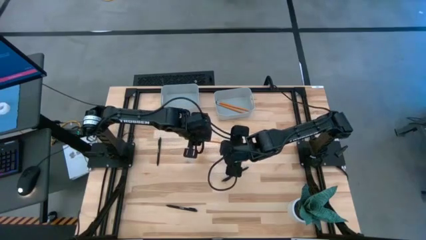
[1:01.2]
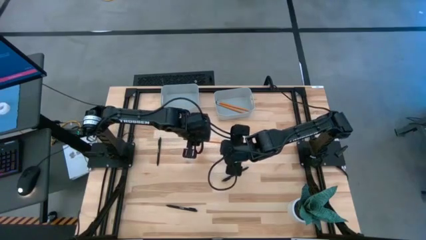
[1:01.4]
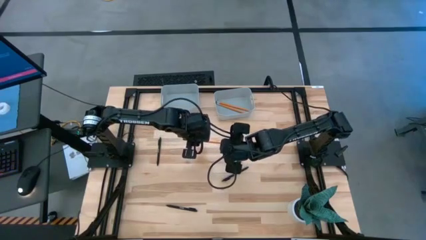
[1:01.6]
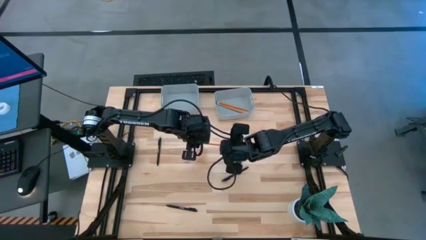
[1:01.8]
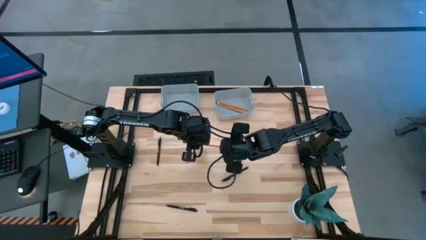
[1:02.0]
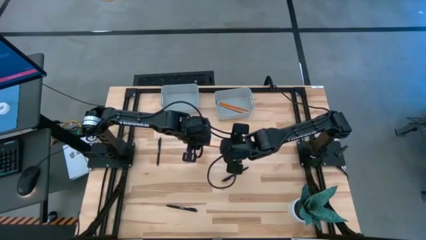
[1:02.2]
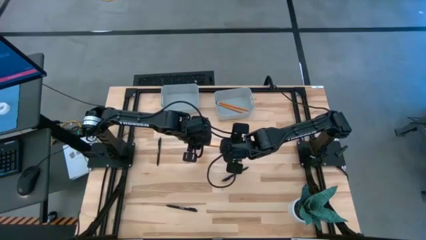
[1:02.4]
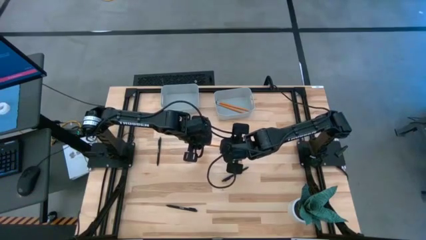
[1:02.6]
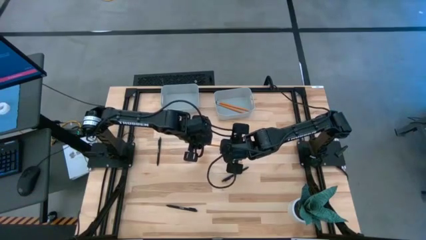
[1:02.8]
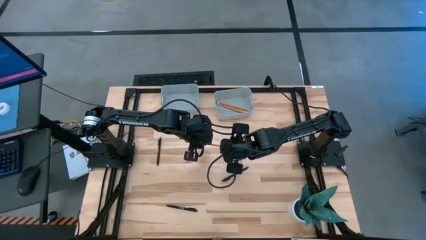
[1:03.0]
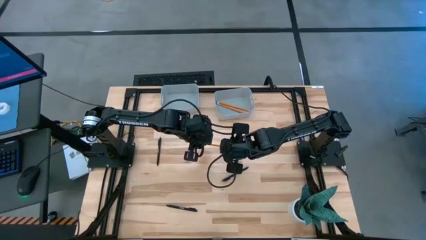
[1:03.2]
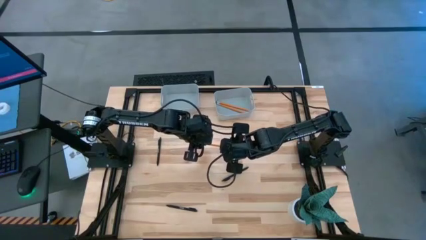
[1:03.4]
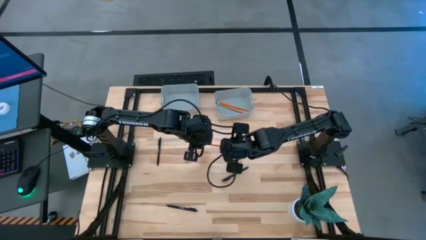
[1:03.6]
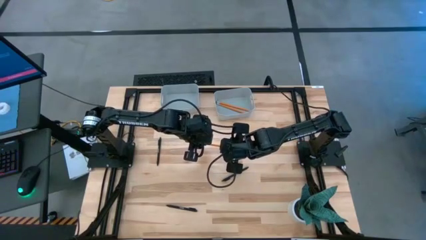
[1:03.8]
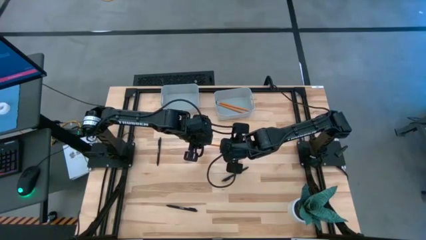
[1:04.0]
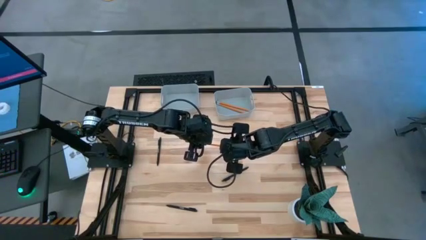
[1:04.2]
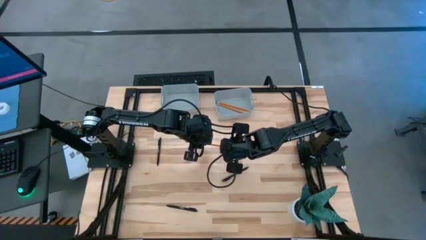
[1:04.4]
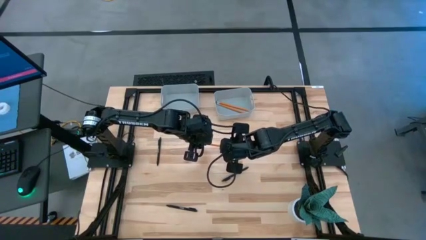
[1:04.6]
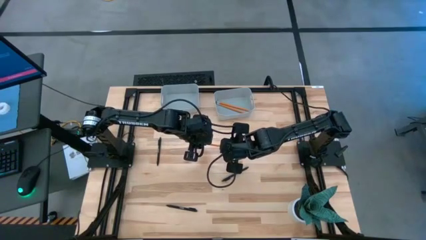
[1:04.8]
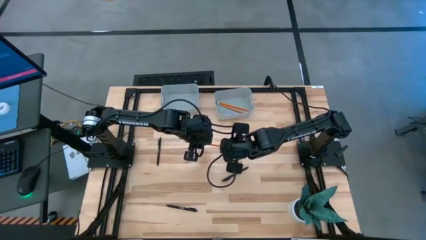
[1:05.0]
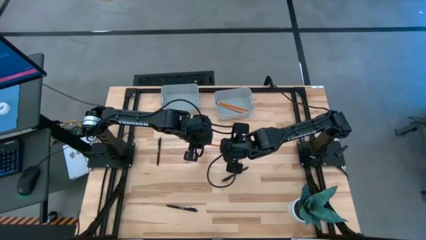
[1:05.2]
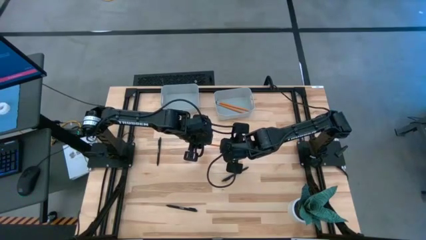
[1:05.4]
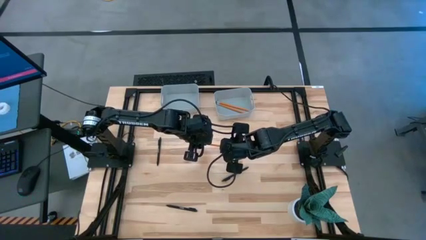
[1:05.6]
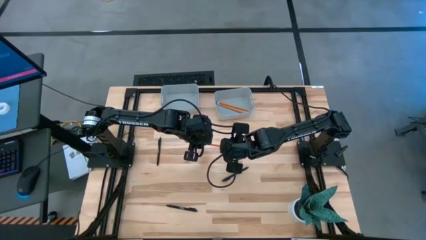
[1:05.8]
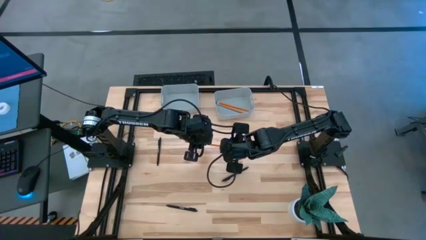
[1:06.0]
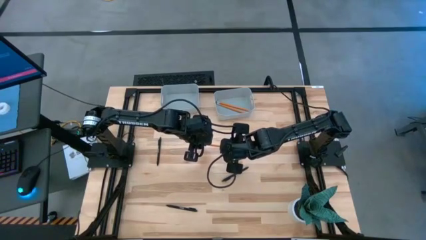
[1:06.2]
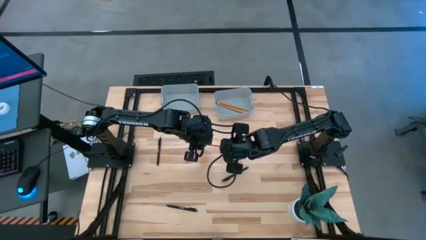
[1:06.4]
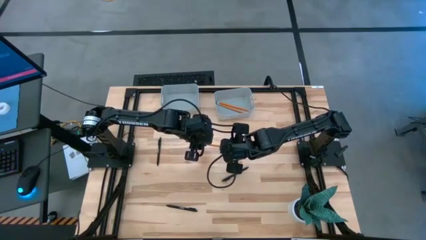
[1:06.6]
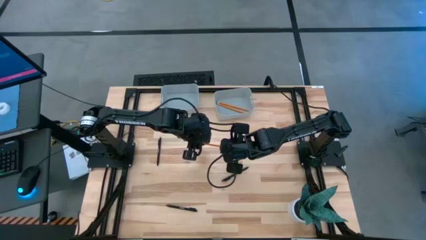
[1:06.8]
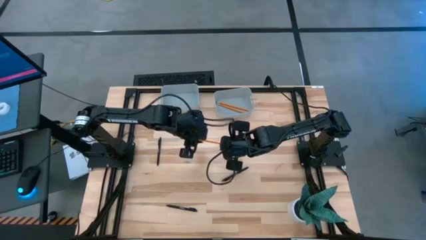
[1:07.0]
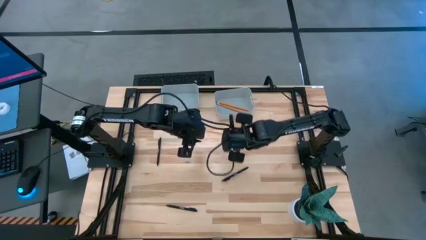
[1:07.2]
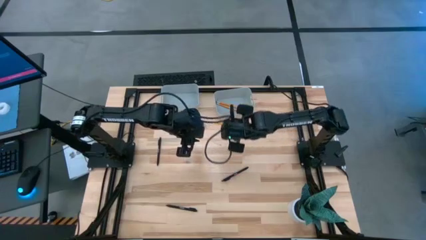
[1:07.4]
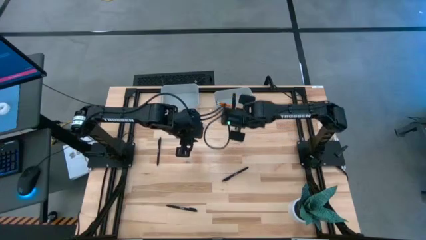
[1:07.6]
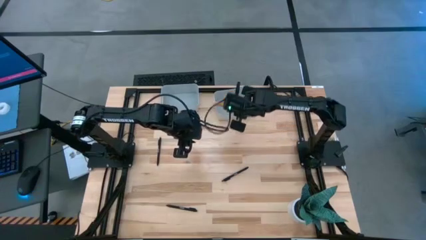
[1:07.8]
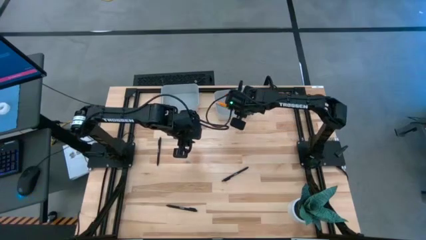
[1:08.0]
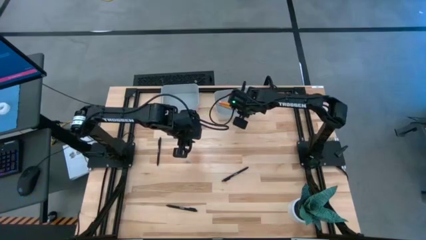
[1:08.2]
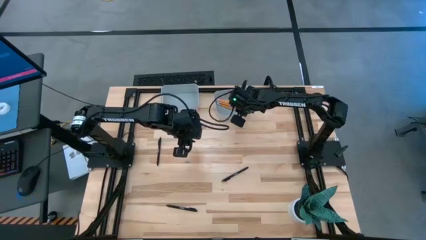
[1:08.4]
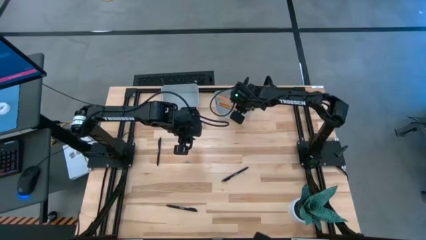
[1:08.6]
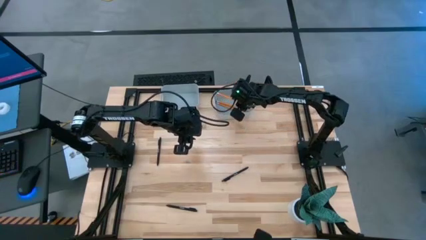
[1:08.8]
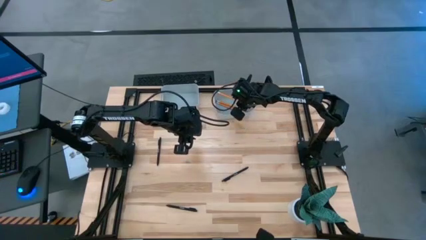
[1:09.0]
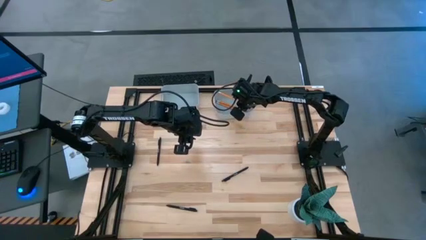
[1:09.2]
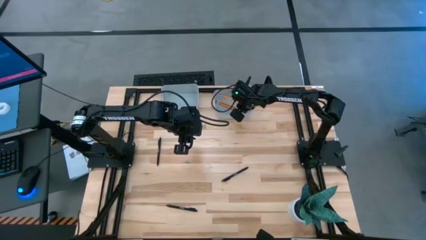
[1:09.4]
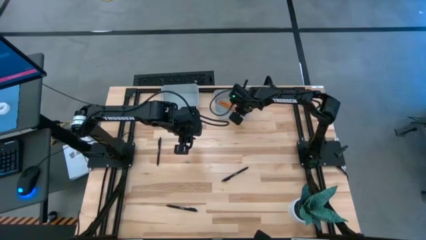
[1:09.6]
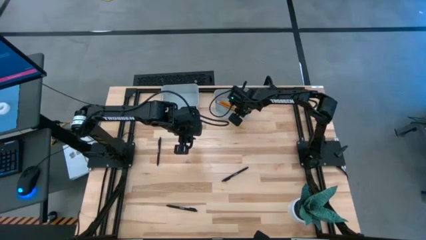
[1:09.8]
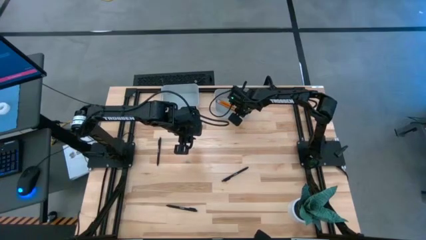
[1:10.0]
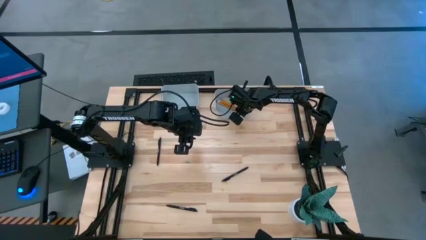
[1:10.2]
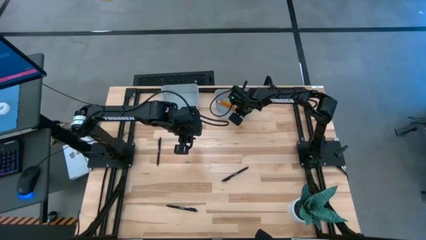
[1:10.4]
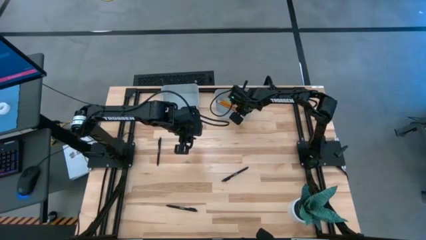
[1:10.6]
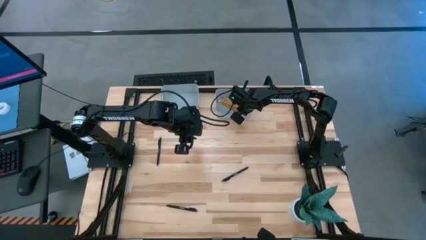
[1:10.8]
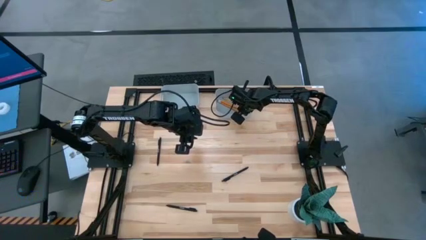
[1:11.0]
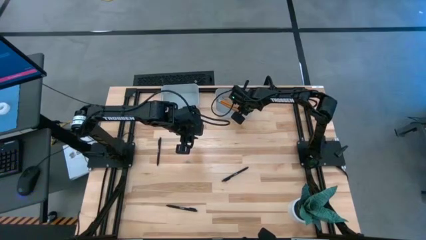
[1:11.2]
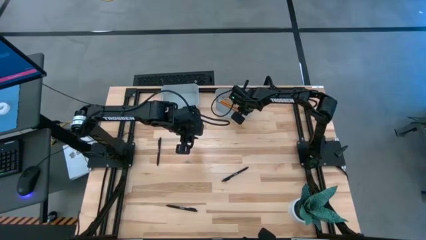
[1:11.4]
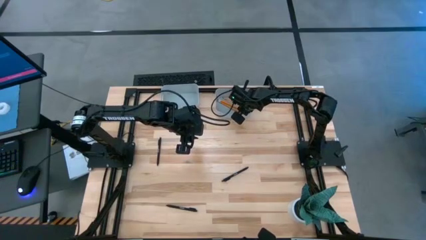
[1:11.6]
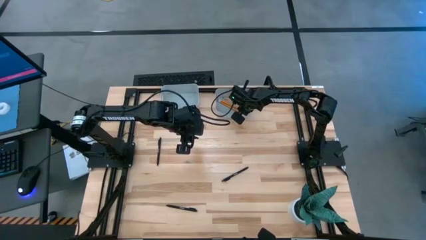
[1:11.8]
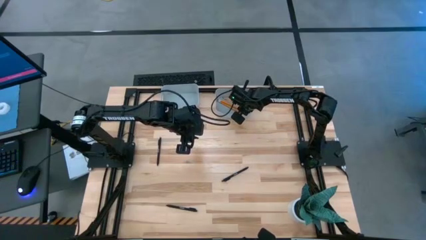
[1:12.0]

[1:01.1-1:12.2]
Task: Sort pens & pencils
Put the pencil into the right gray bin
